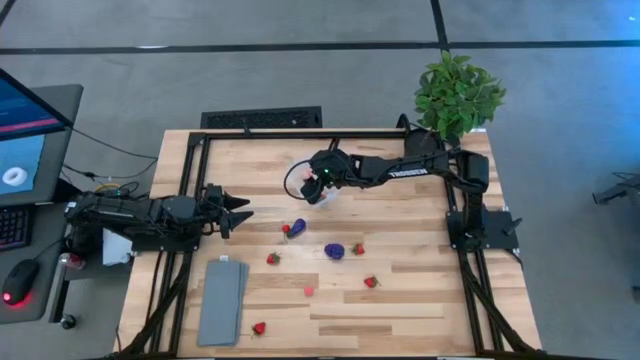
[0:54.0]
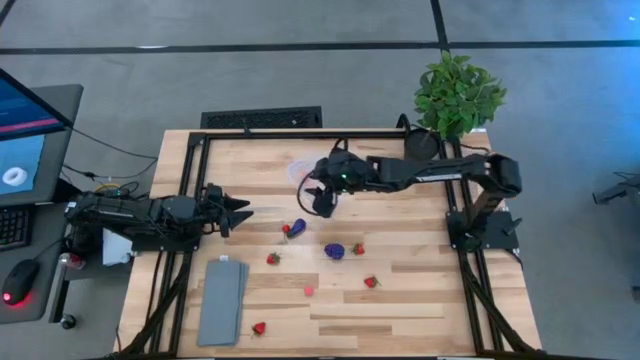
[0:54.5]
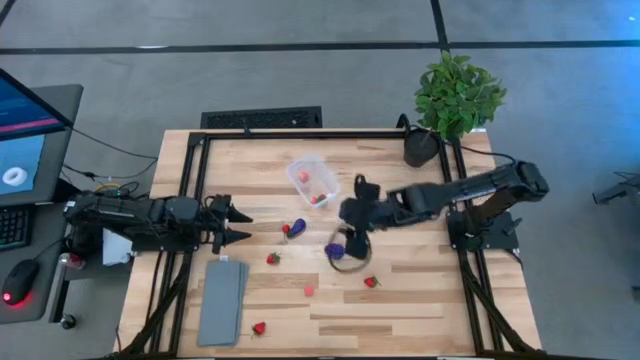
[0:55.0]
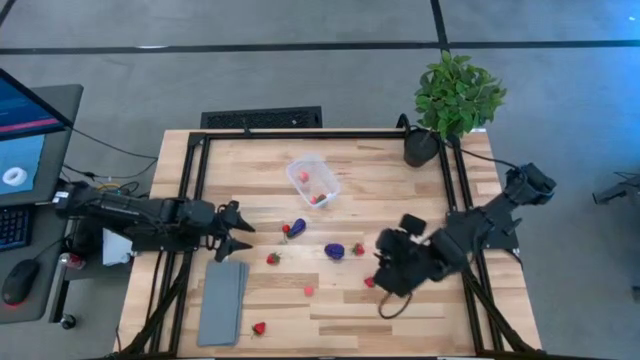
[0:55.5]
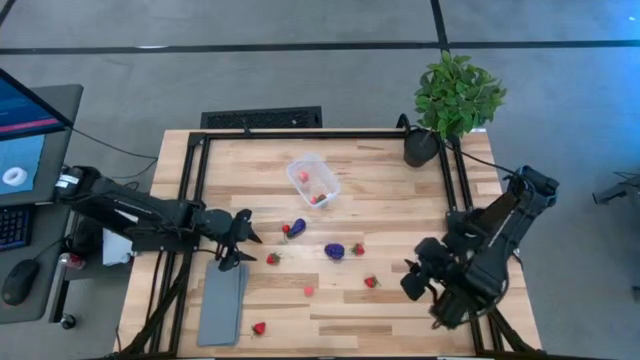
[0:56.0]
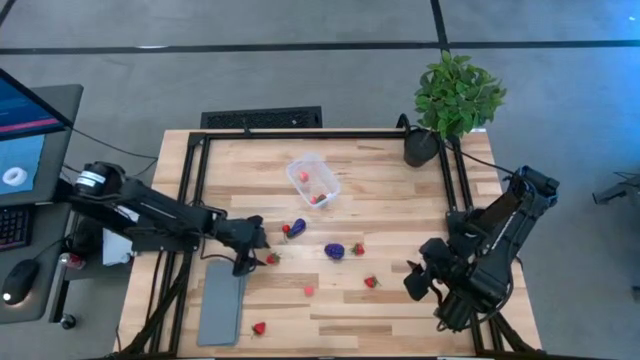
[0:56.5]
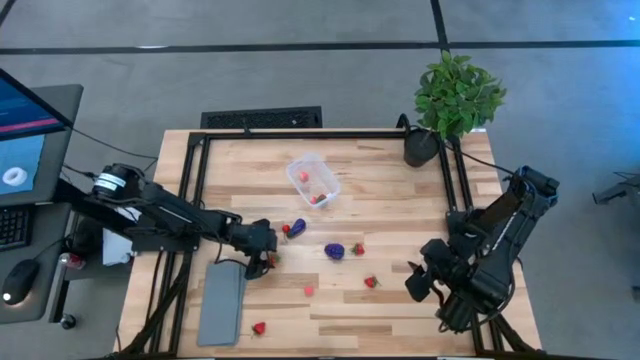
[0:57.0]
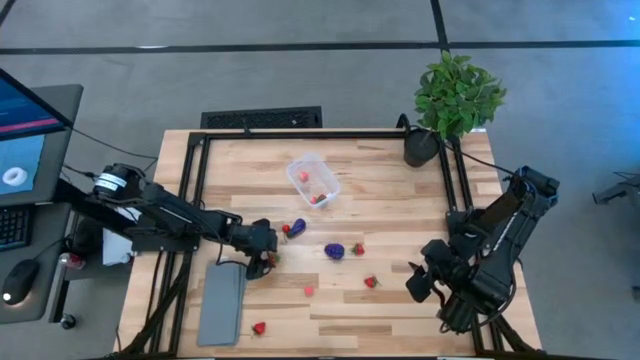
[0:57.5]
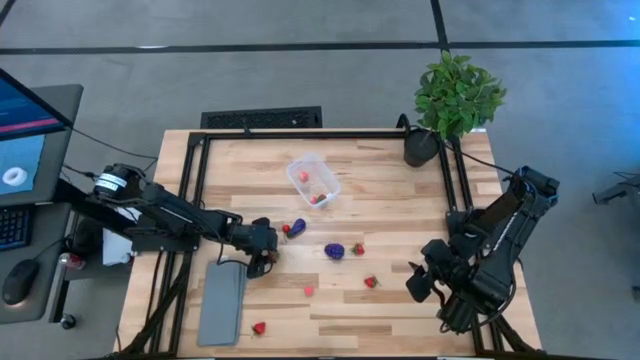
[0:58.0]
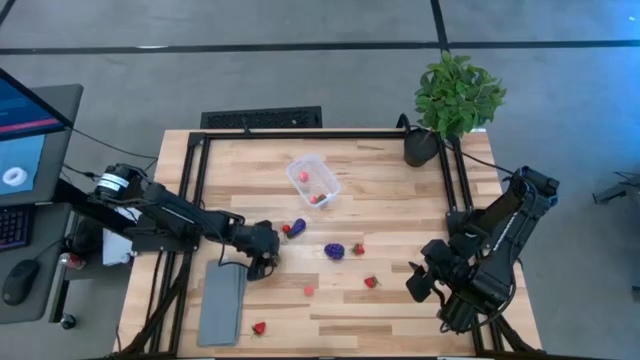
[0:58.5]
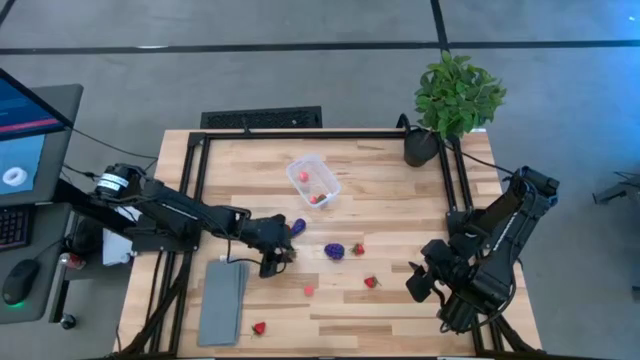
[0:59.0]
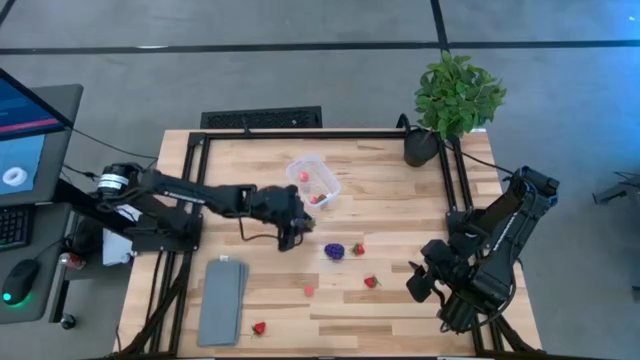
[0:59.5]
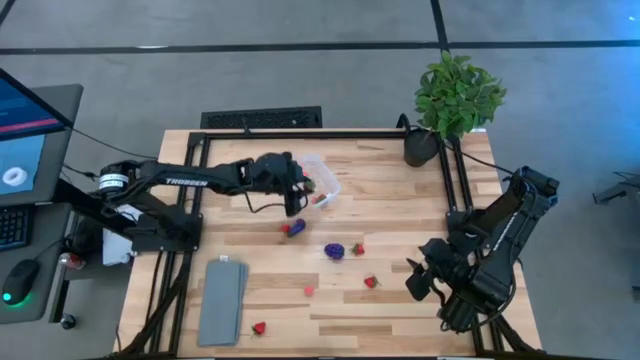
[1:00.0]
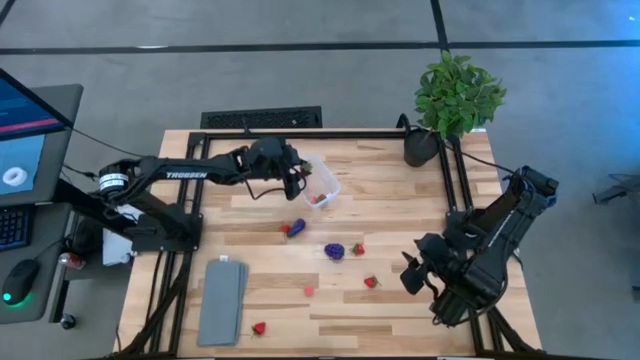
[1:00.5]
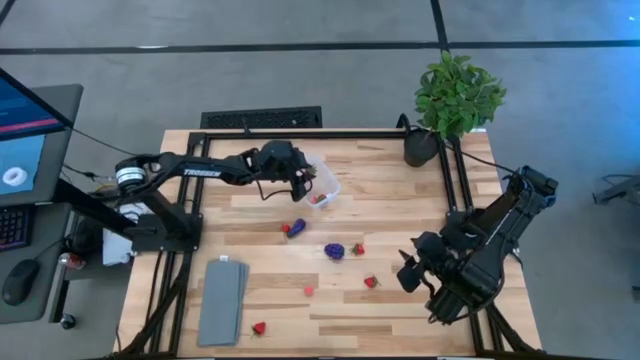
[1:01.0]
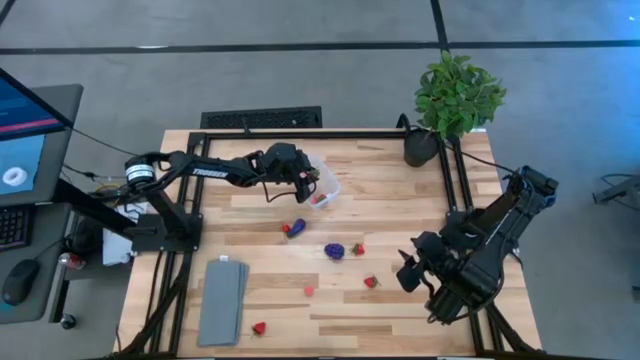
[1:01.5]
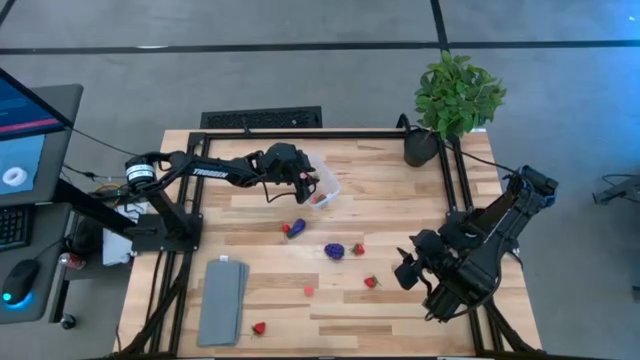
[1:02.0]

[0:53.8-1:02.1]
Task: Pick and placing Produce into tupperware
Put the strawberry into the transparent container

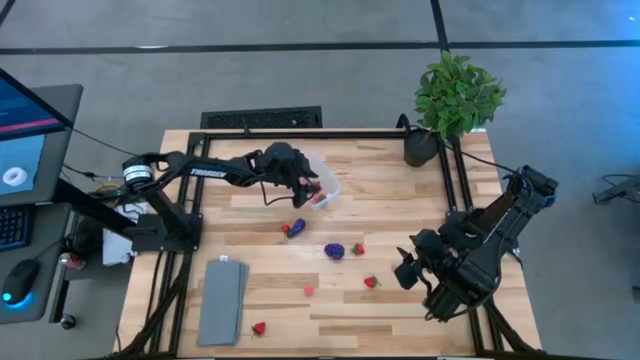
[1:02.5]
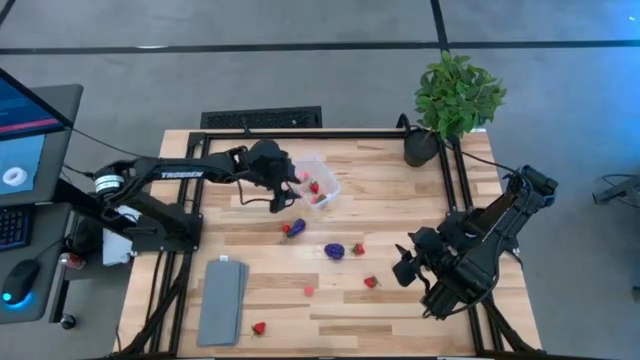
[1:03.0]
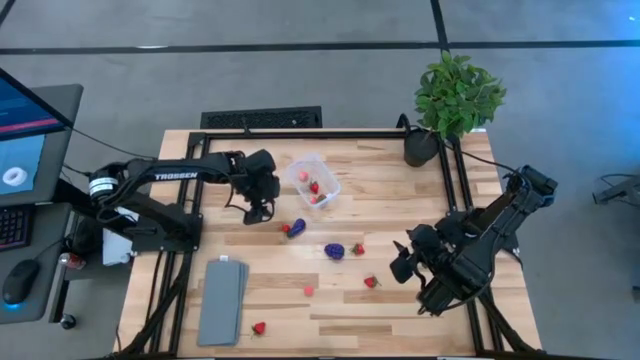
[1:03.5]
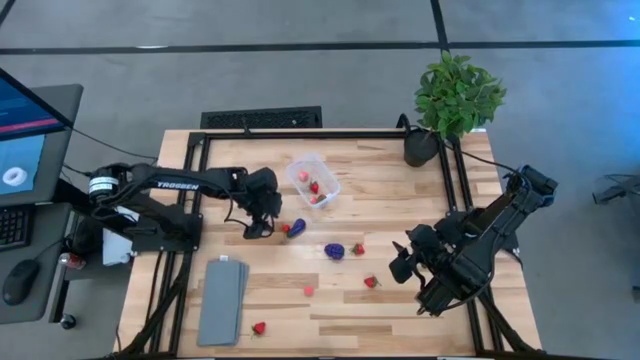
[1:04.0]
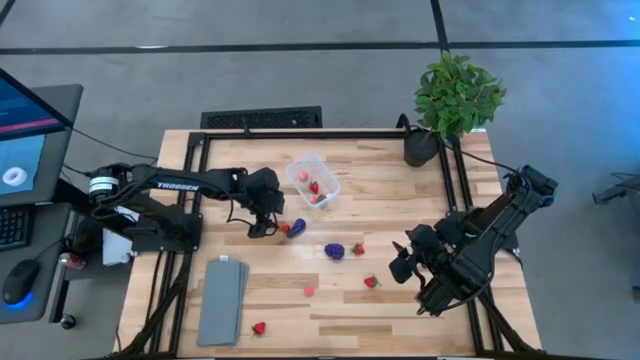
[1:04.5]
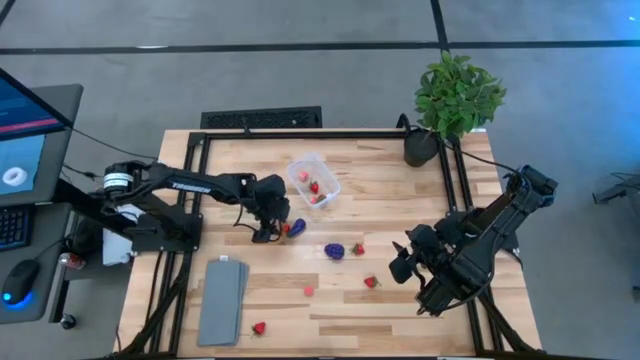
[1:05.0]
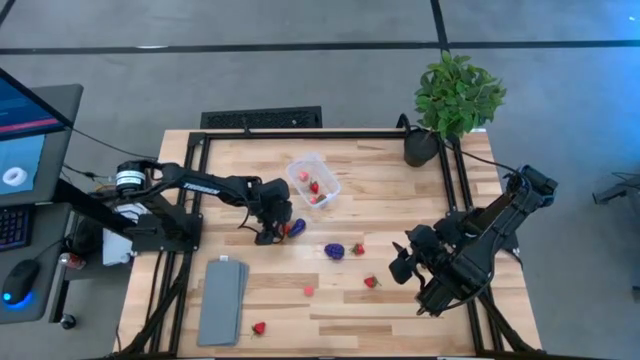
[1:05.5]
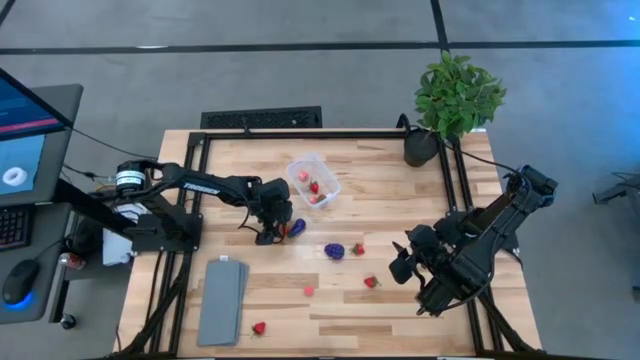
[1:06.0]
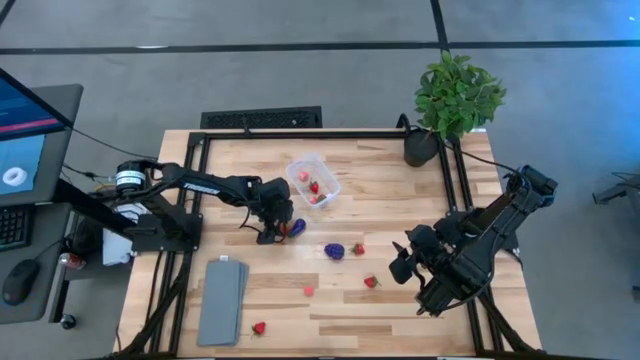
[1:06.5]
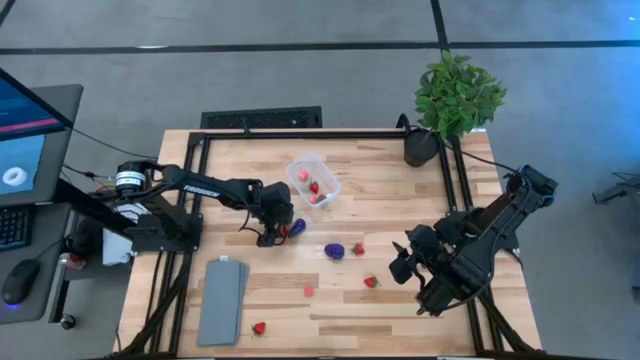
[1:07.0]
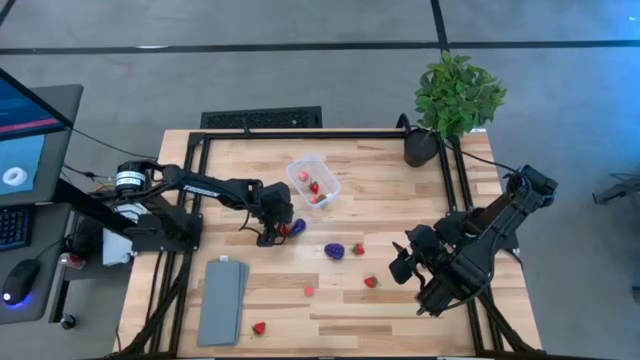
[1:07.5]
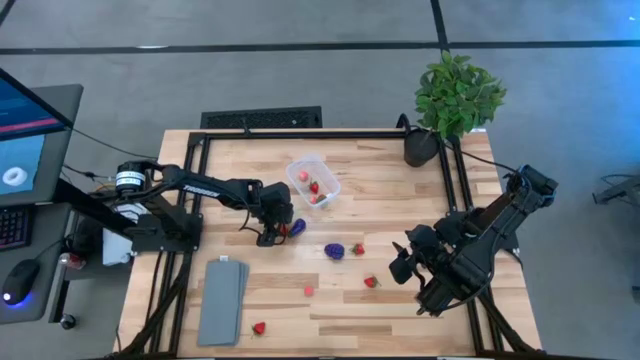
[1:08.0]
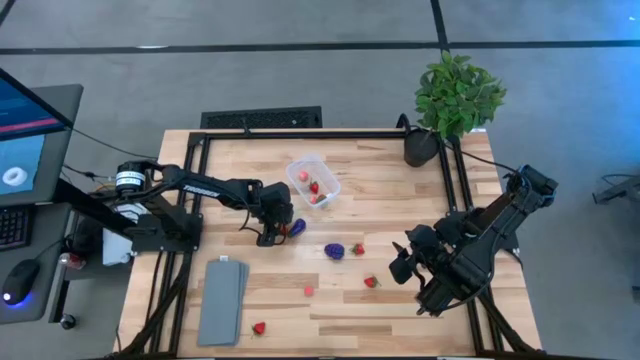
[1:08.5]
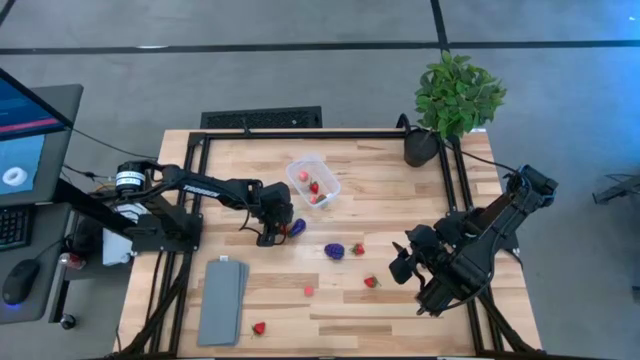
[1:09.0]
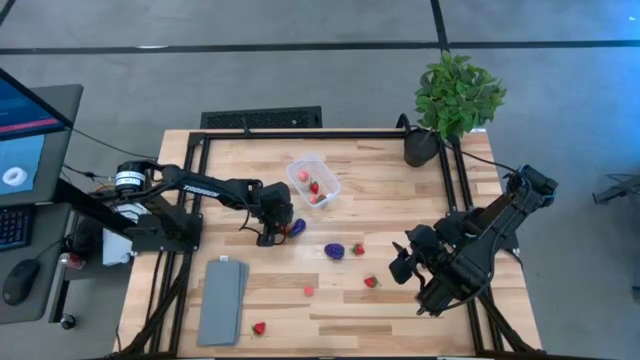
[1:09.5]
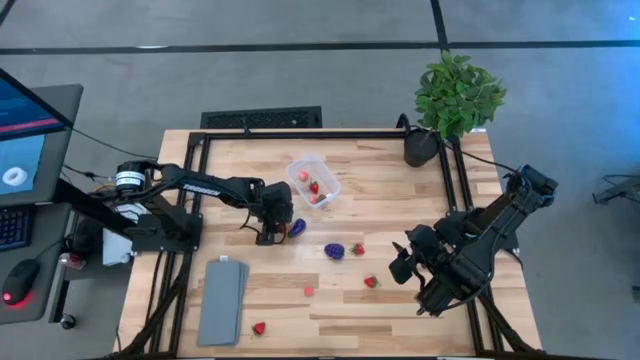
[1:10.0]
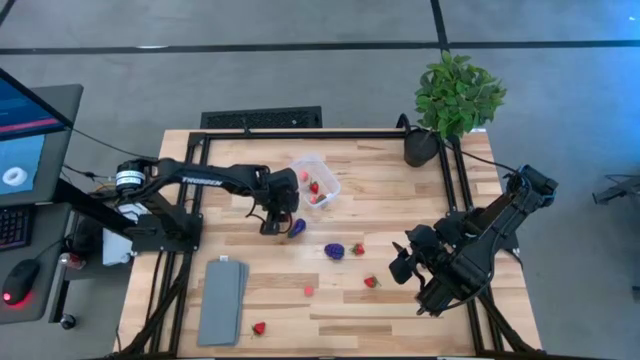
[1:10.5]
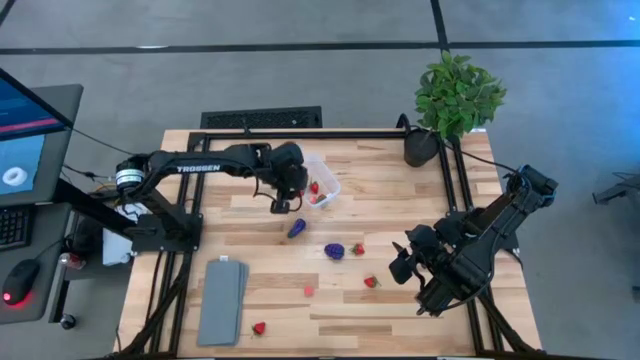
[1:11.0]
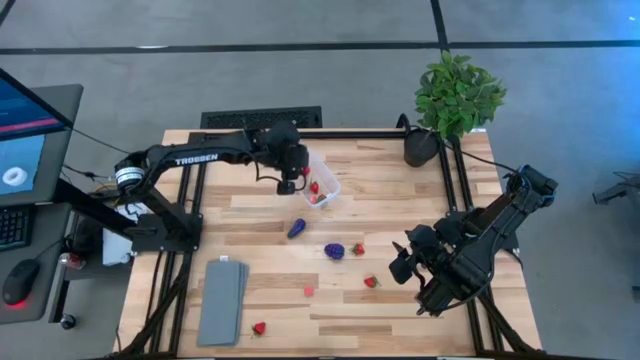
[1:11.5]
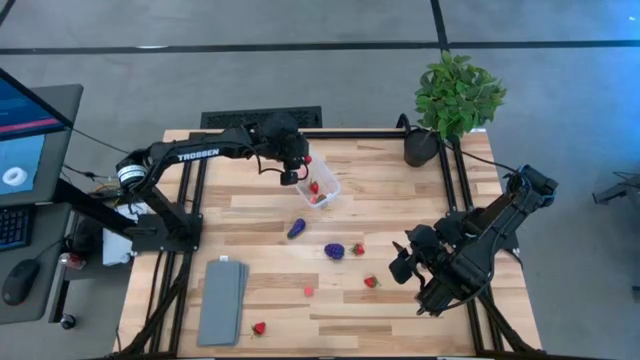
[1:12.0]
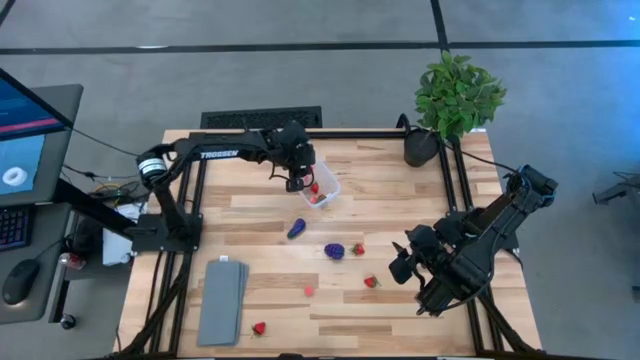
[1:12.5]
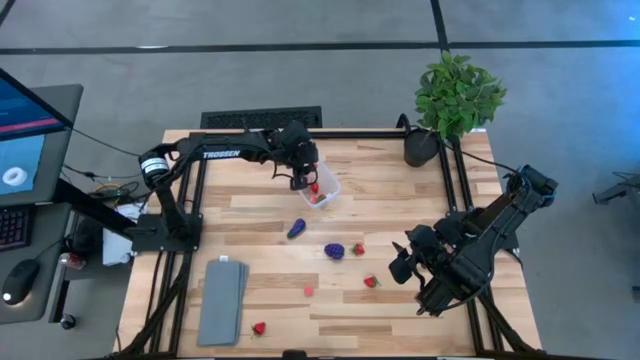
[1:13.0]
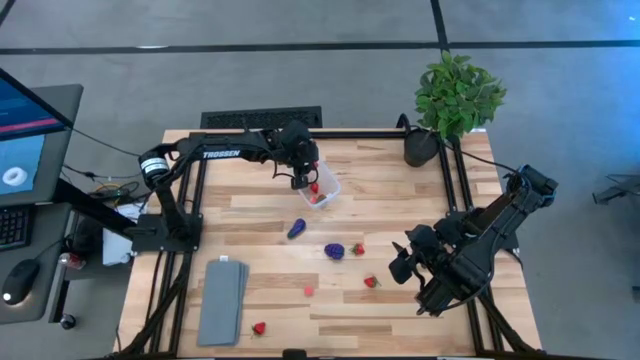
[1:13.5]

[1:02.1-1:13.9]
Put the cherry into the transparent container

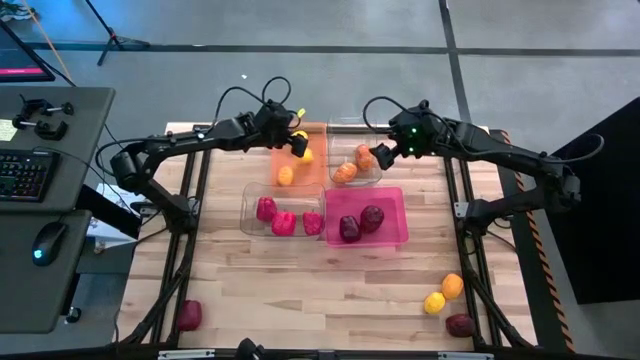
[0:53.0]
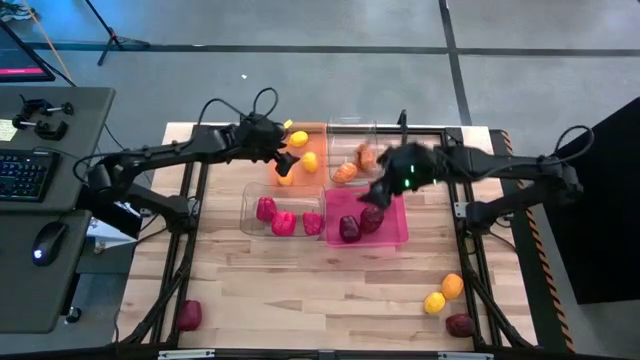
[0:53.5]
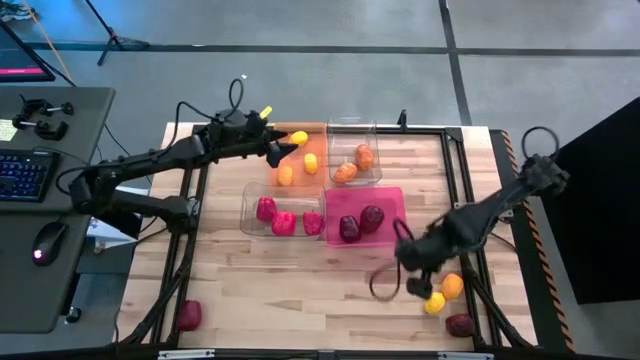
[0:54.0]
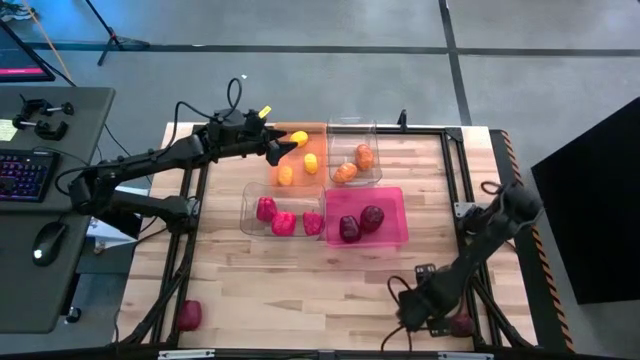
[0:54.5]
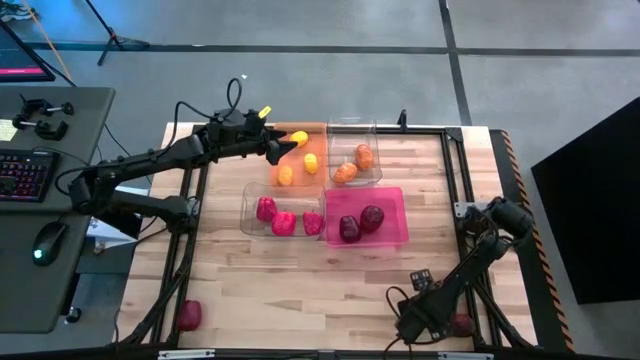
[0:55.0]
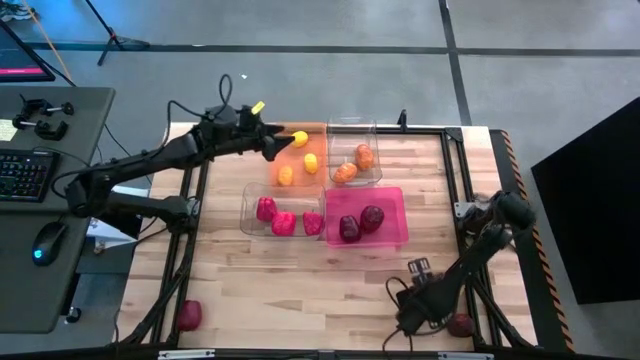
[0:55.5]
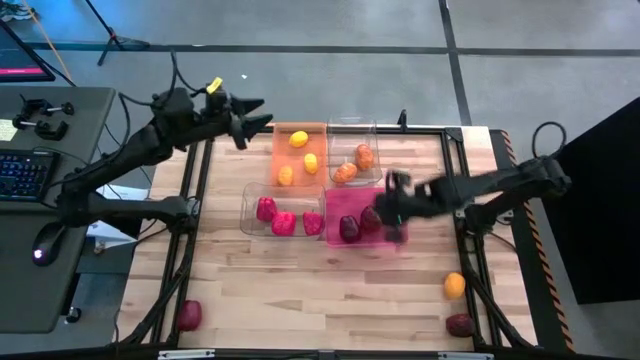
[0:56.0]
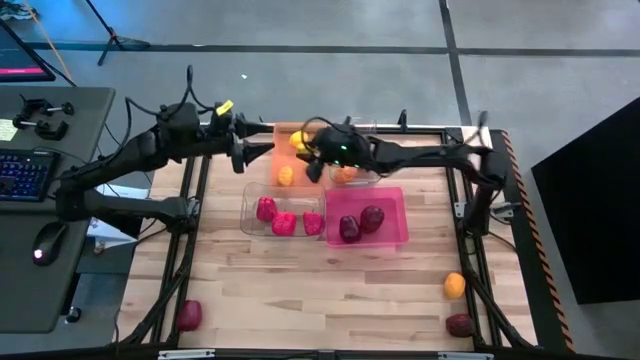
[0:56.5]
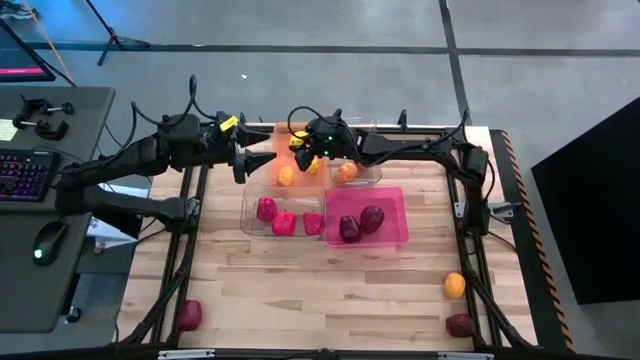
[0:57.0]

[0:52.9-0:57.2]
Task: Sort produce into baskets
Put the lemon into the orange bin
